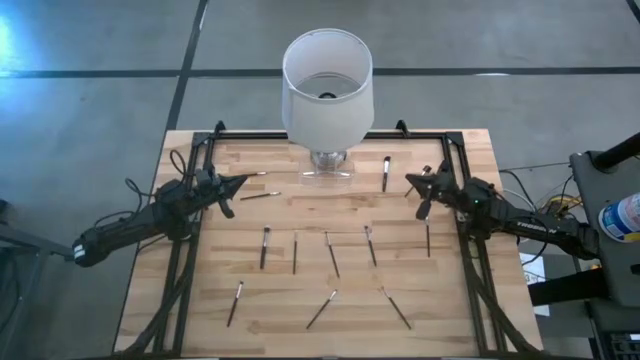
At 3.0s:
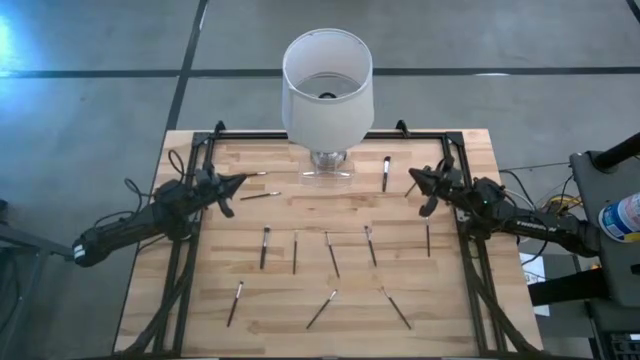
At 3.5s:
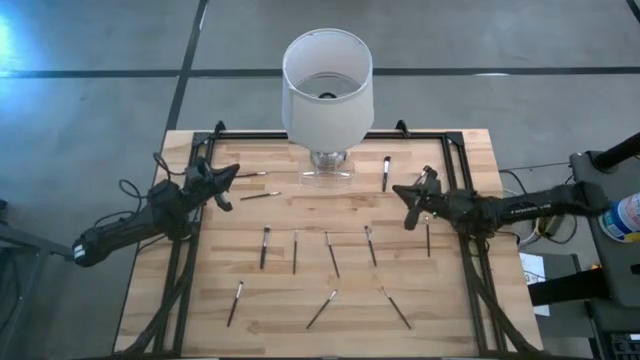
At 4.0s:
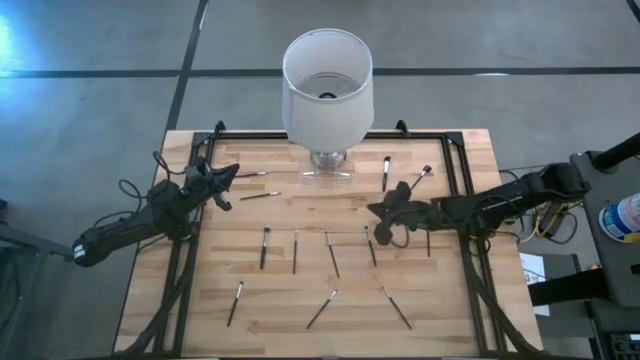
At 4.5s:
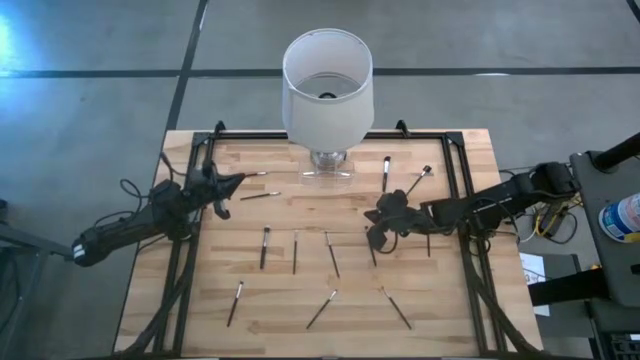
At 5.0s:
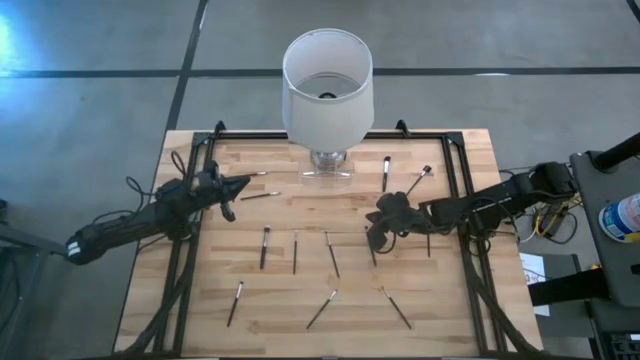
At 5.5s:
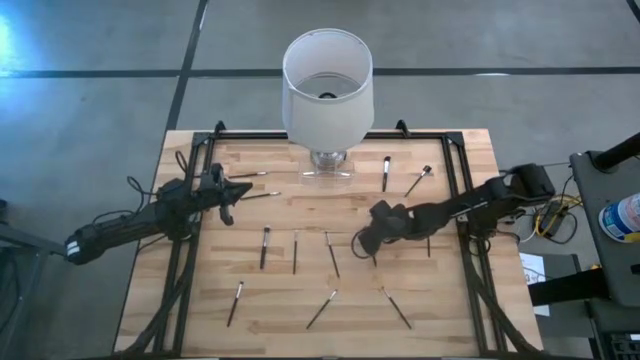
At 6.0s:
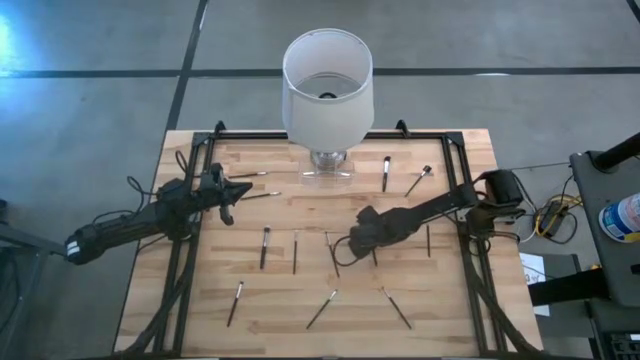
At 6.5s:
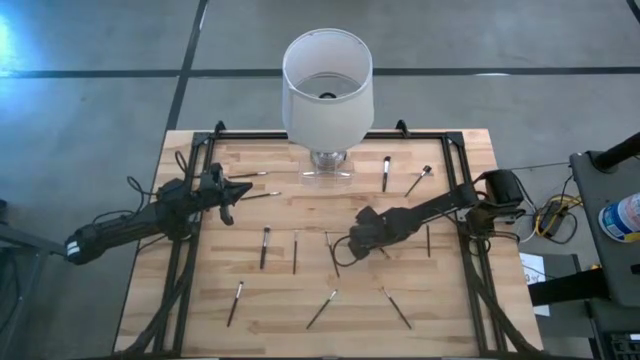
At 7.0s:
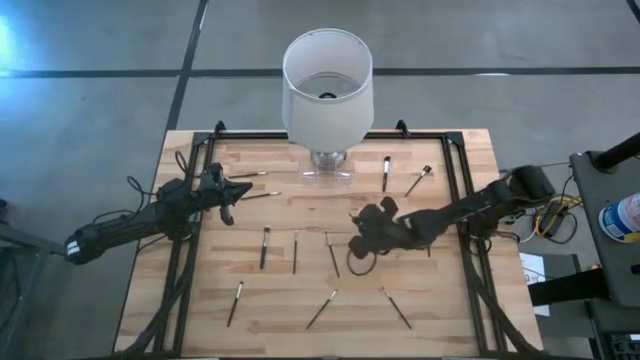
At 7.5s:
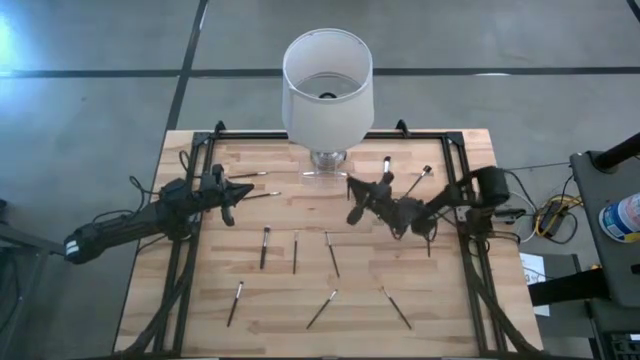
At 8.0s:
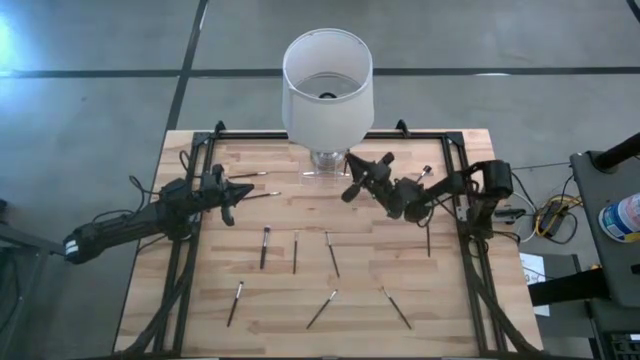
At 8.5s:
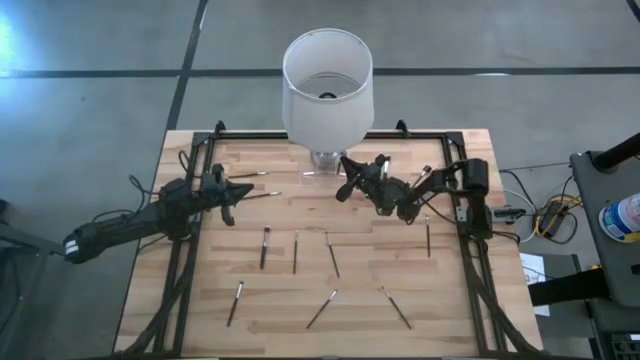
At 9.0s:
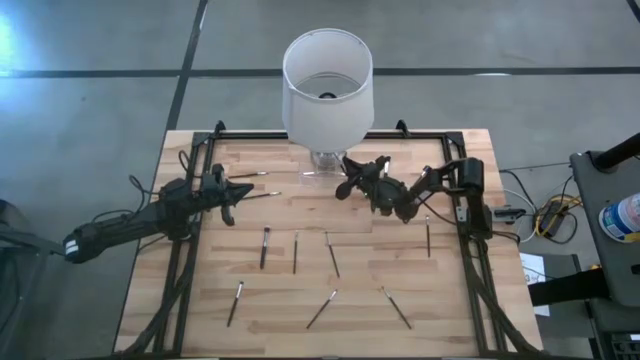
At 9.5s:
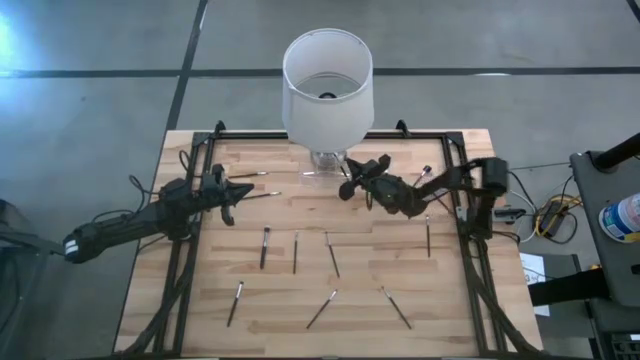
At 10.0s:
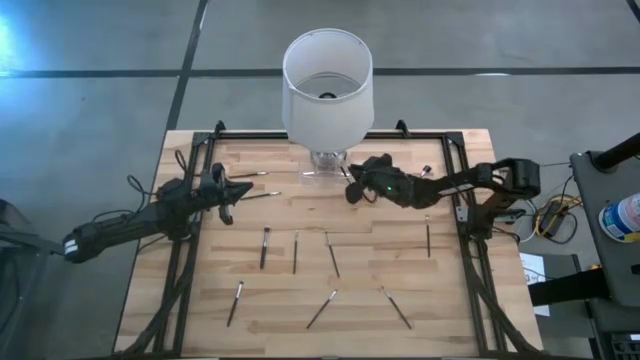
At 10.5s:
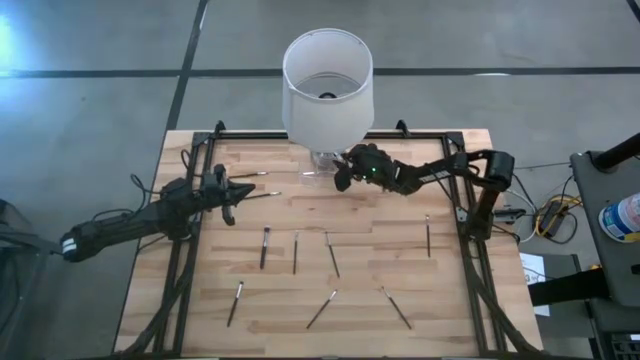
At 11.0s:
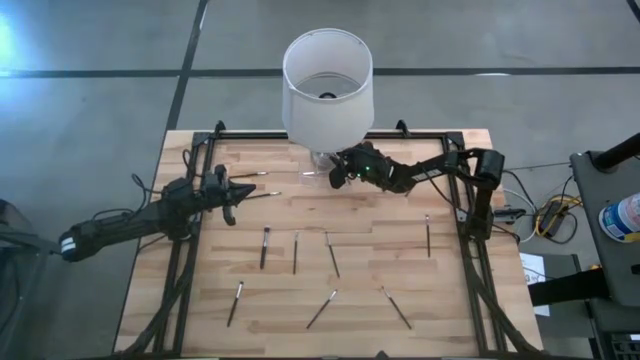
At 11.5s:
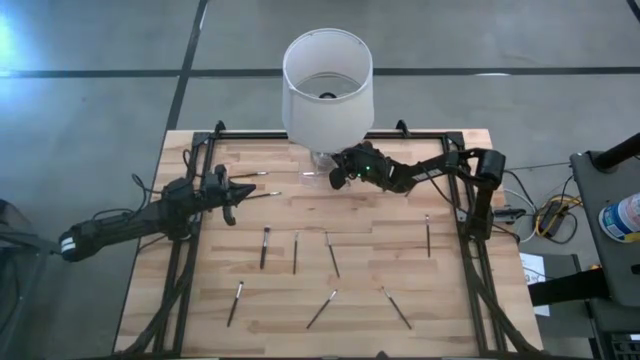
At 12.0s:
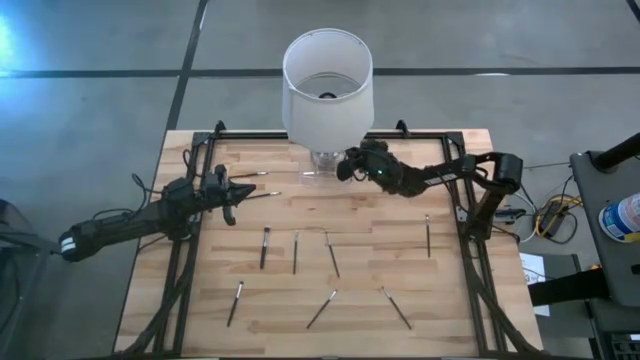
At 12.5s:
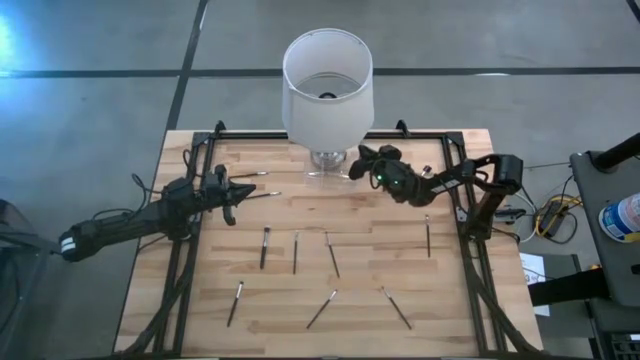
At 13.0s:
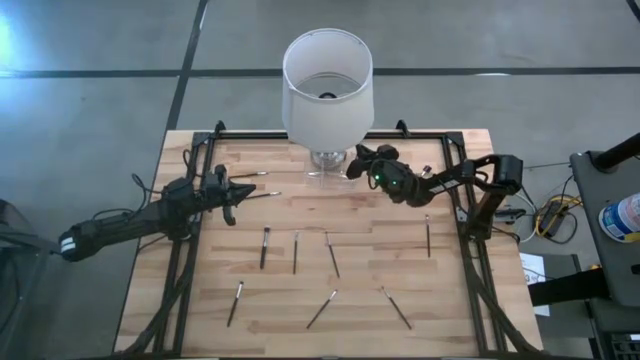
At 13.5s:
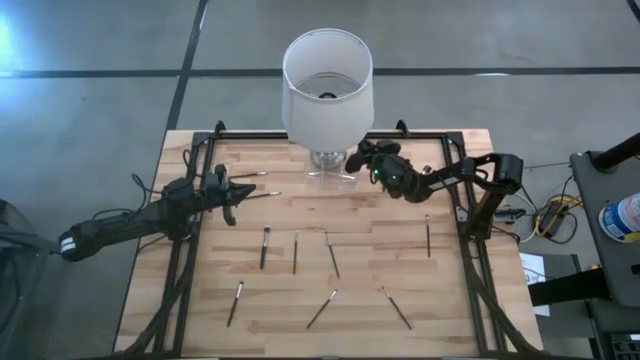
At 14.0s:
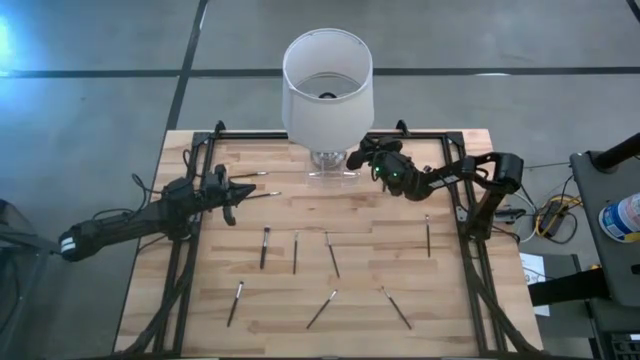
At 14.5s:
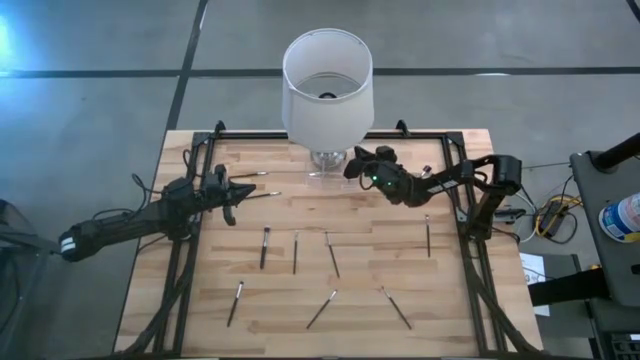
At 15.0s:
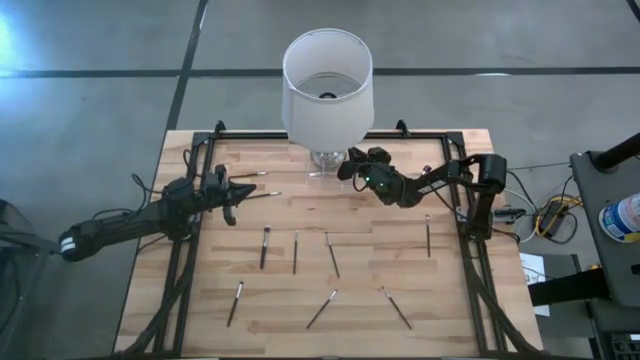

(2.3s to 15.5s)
Task: Put items in baskets/containers
Put the black foundation brush into the transparent organizer

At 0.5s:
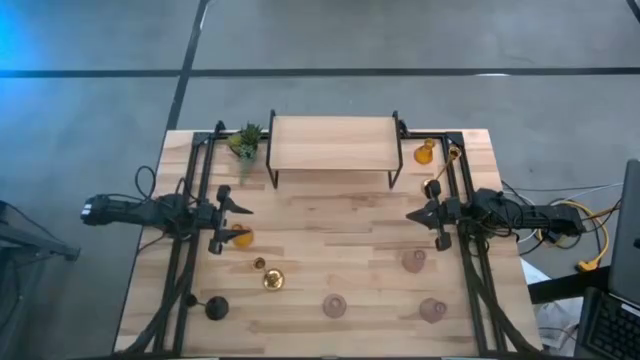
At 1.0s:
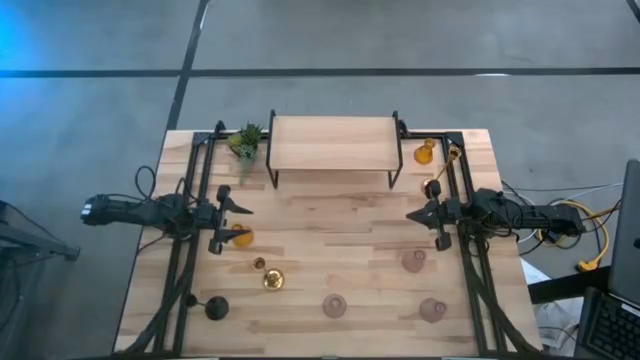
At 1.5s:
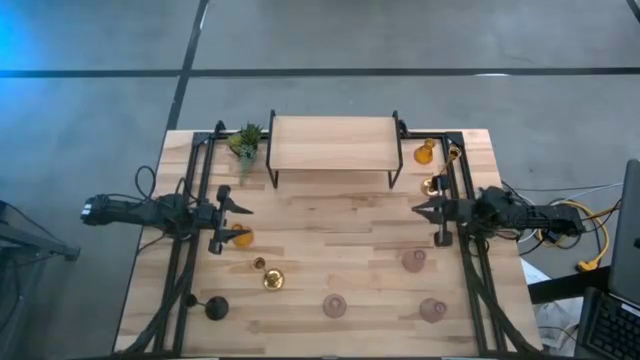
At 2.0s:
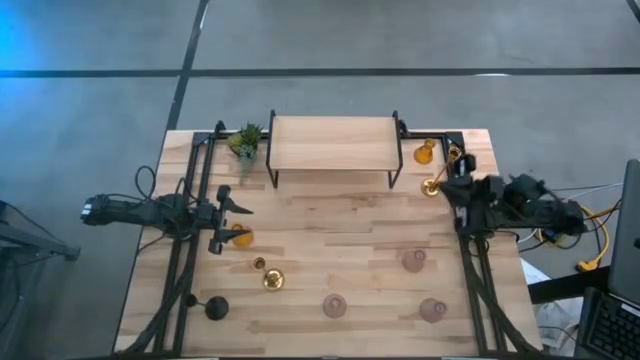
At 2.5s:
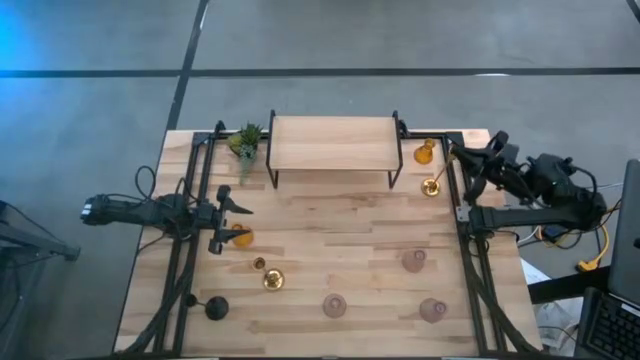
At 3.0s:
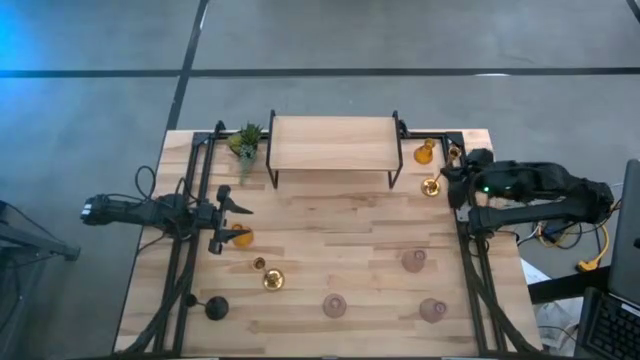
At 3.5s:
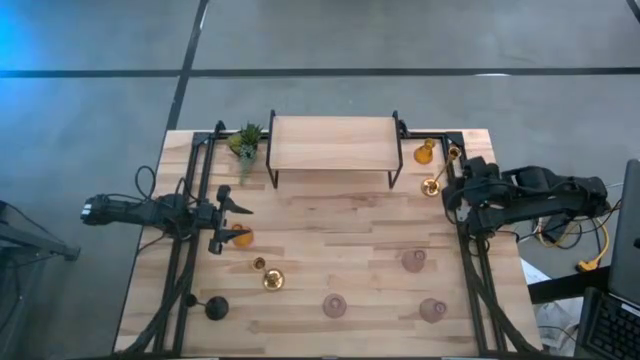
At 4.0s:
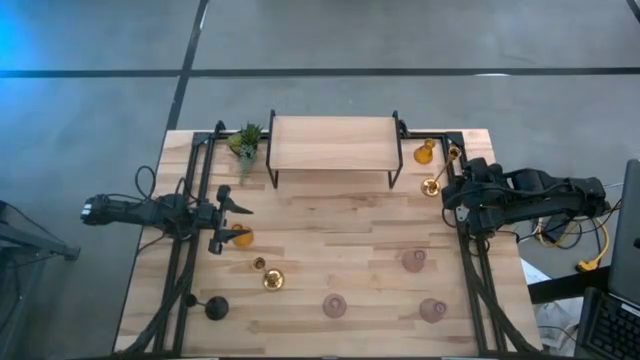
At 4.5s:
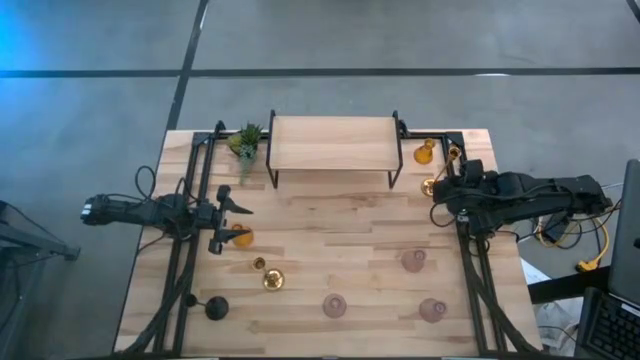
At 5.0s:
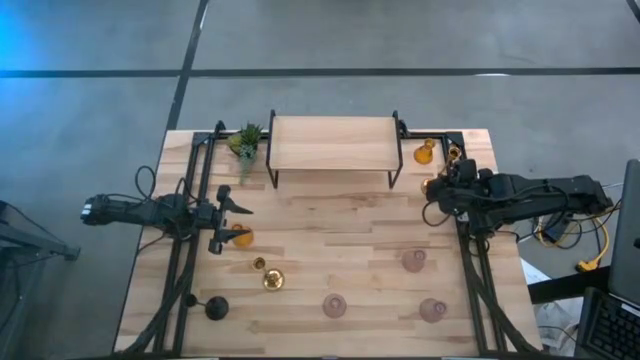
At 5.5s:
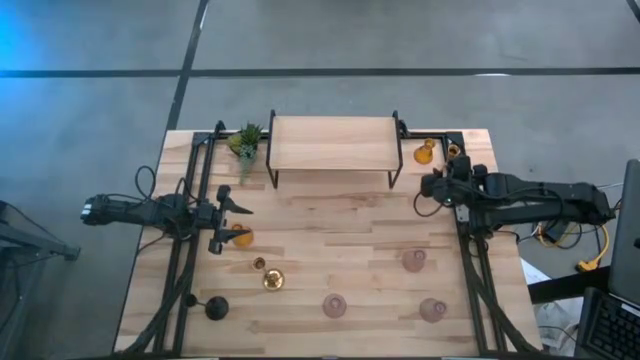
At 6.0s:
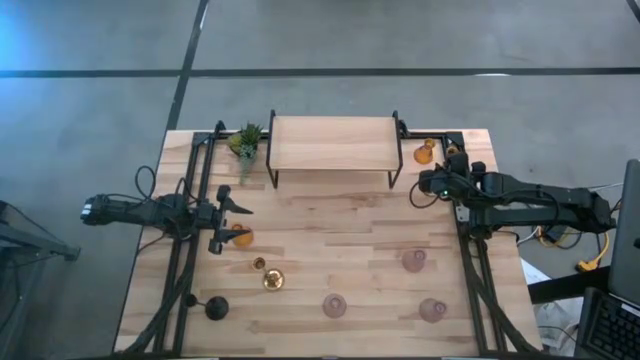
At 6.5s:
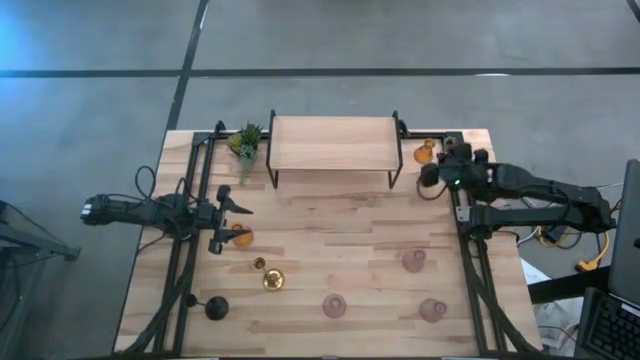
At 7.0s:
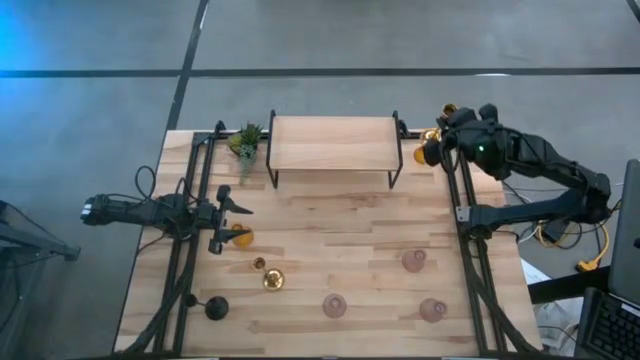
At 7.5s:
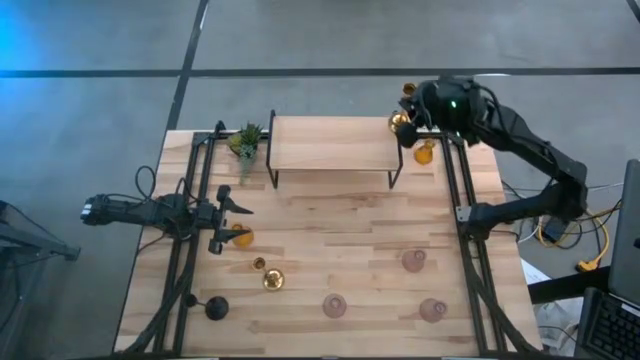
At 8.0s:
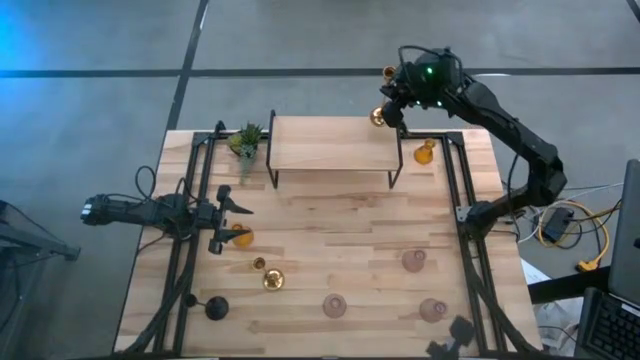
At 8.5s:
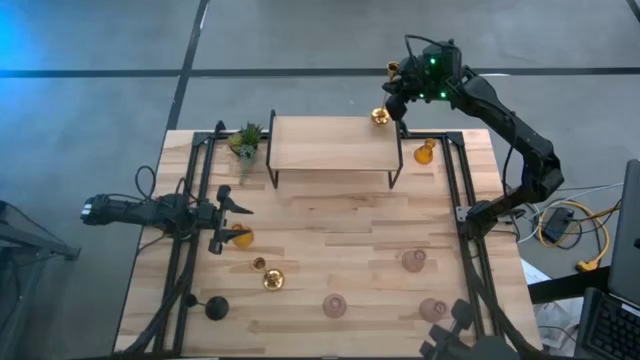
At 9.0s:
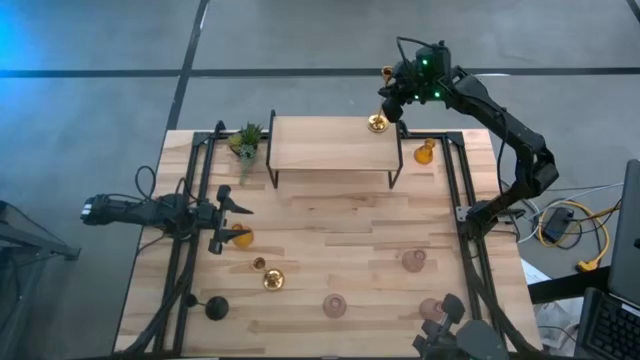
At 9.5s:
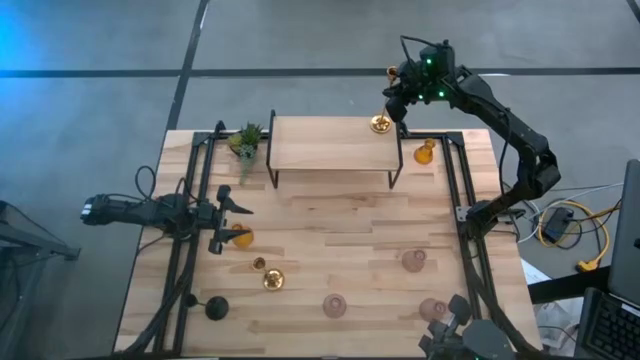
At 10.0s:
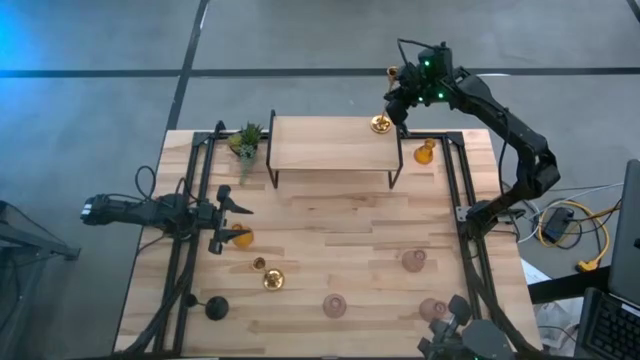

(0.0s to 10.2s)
Task: Pick & Place candle stick holders
Put the top gold candle holder on the shelf
